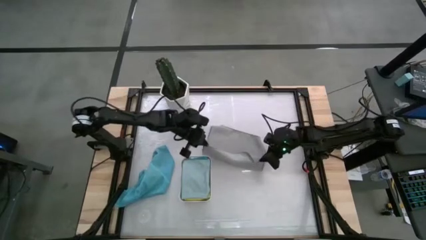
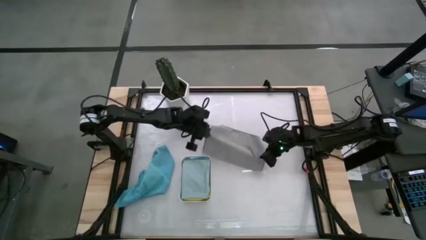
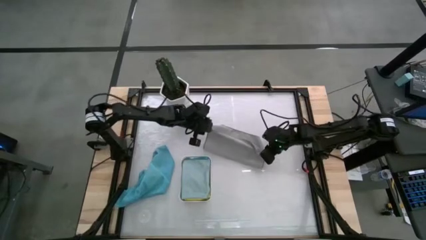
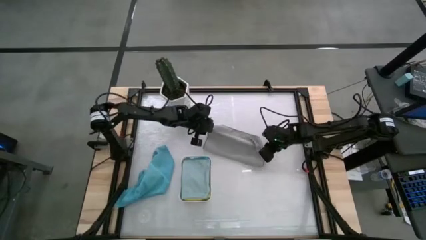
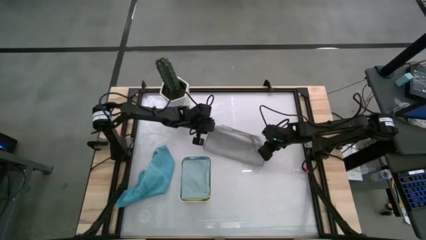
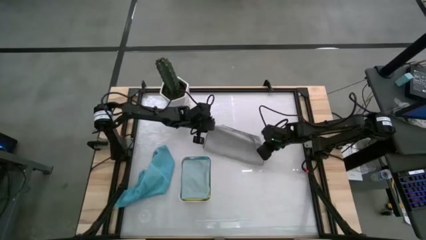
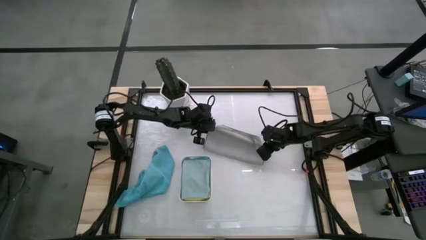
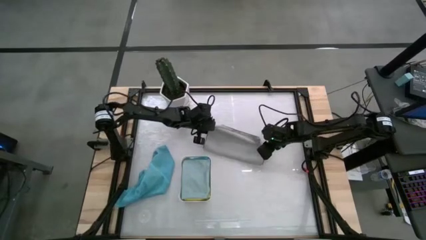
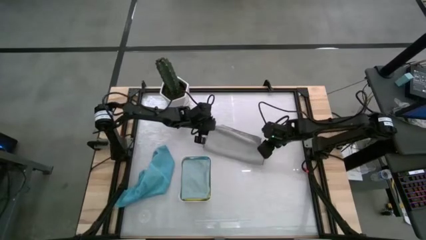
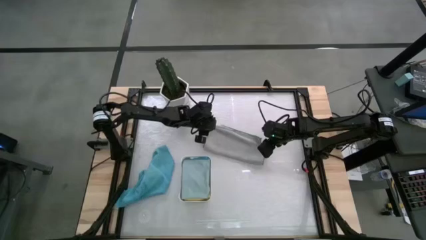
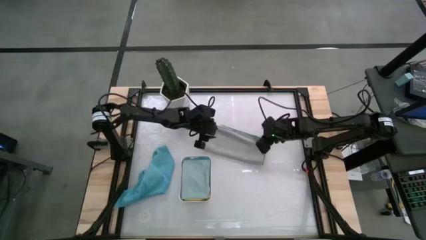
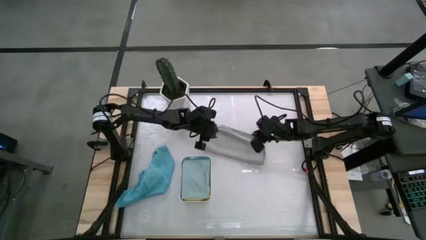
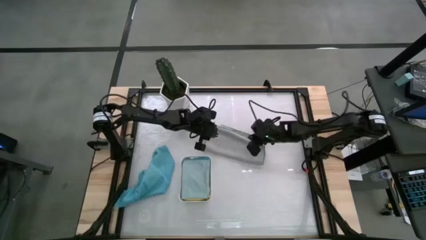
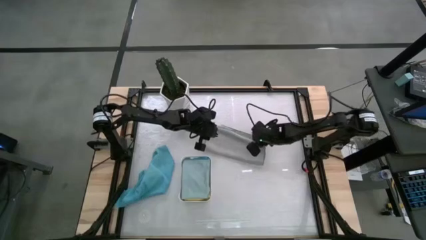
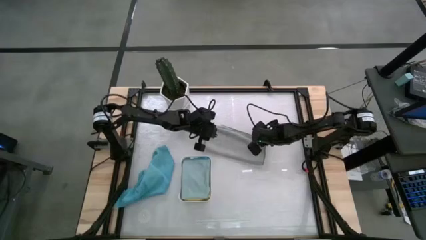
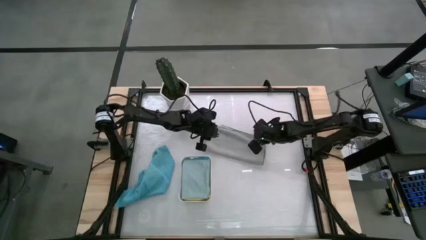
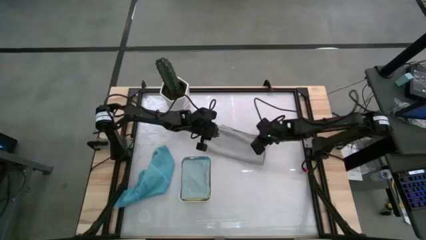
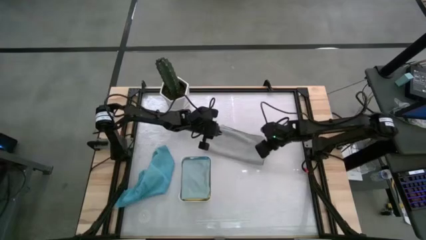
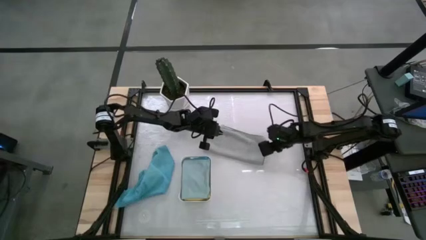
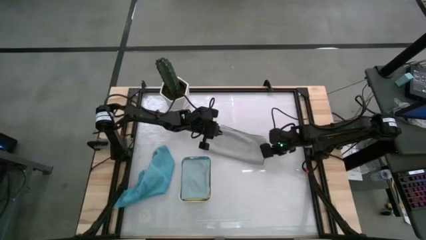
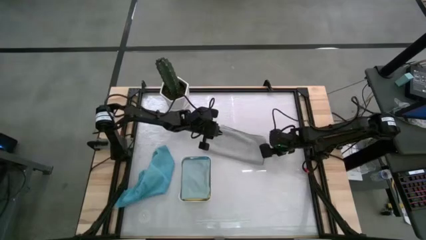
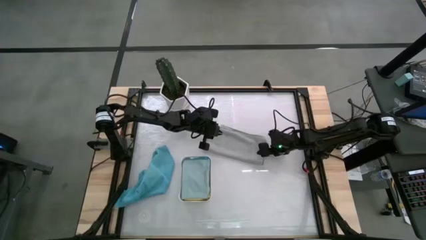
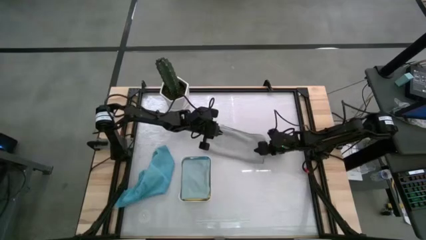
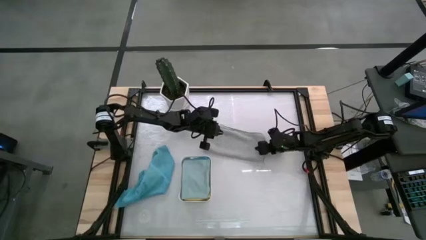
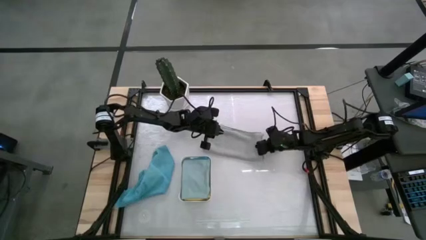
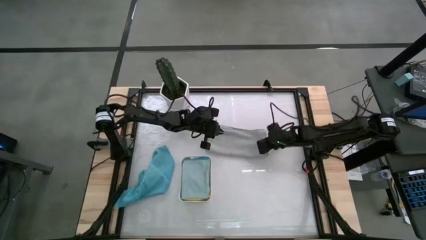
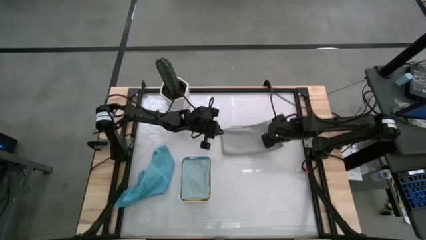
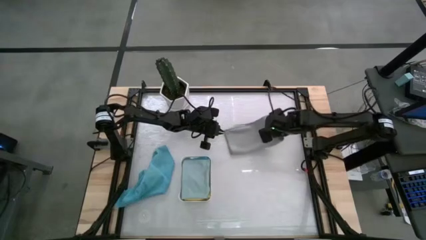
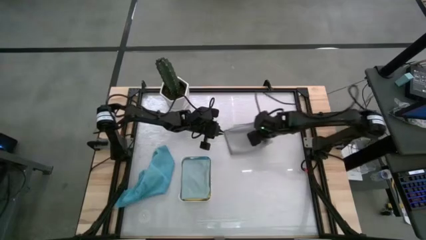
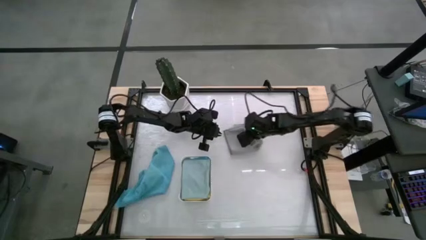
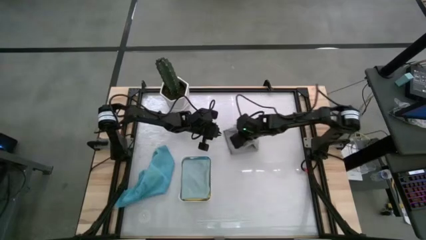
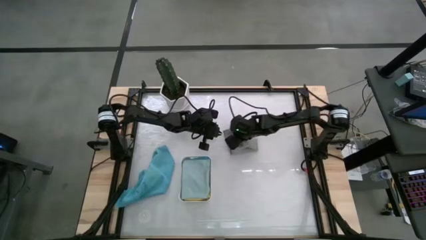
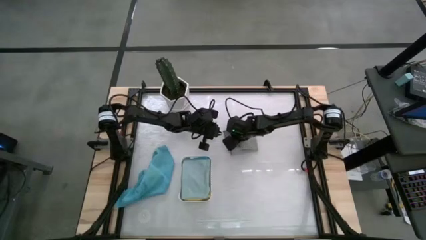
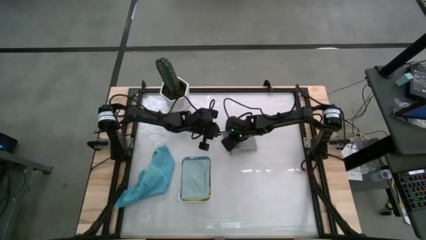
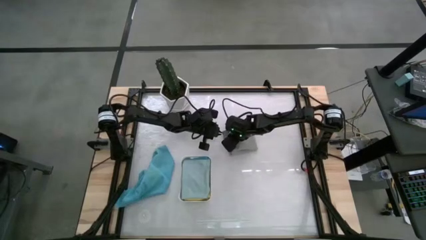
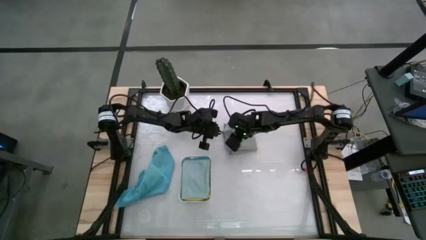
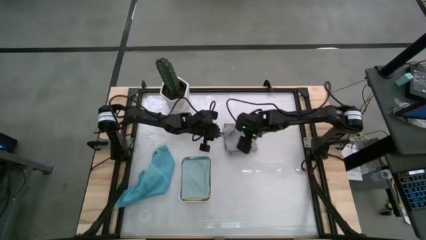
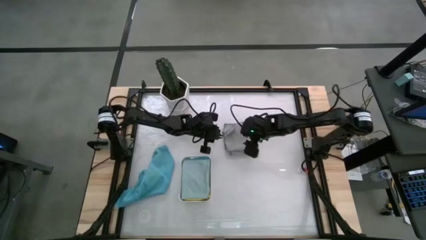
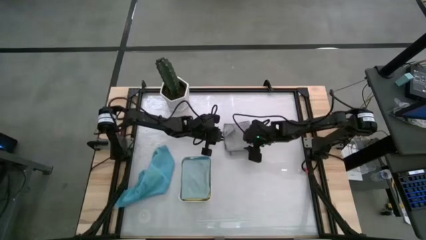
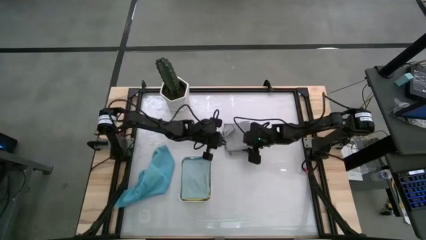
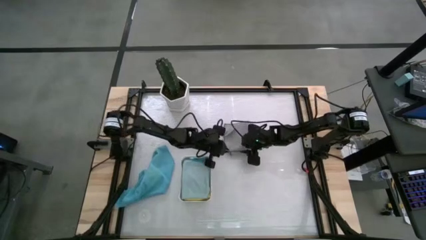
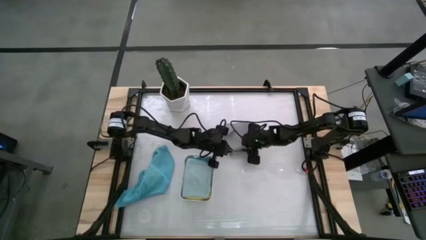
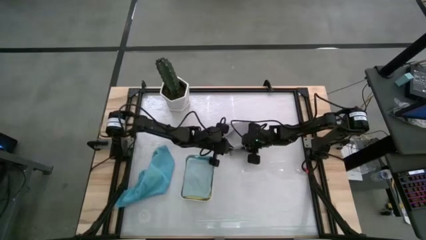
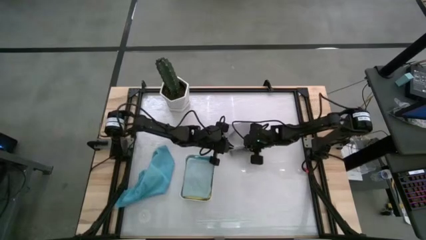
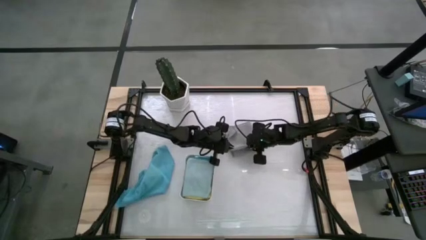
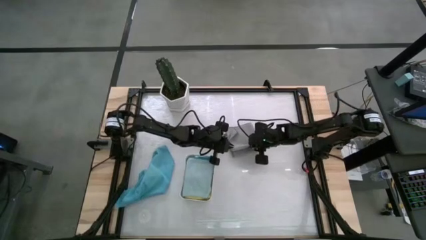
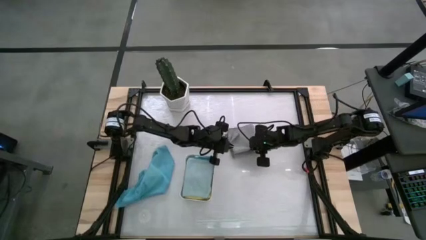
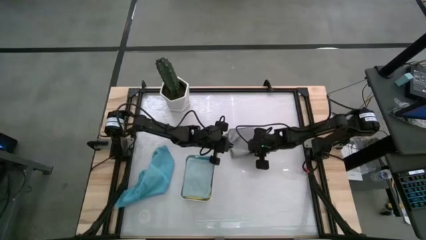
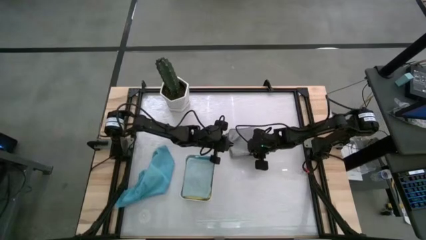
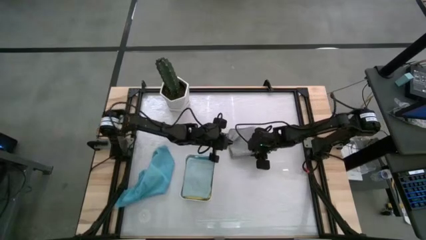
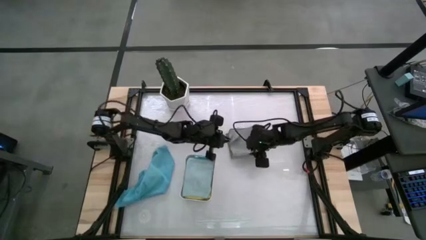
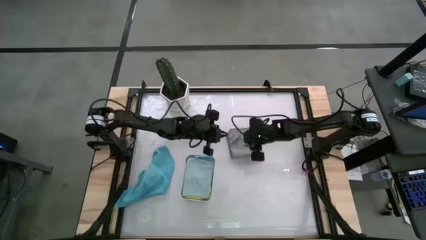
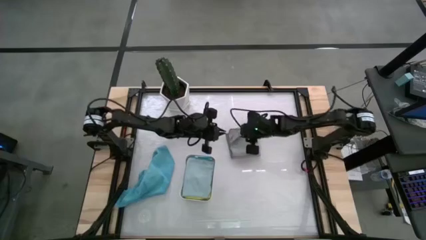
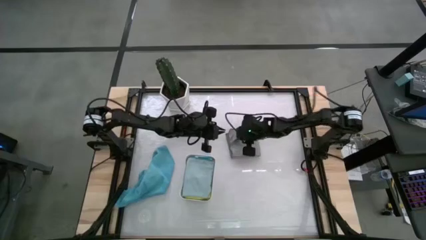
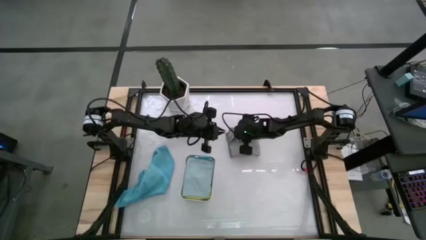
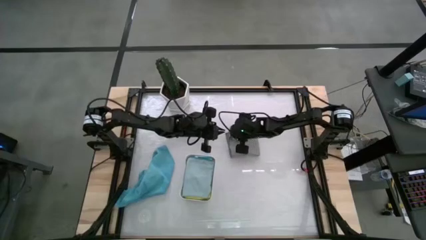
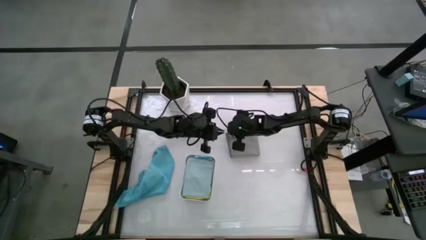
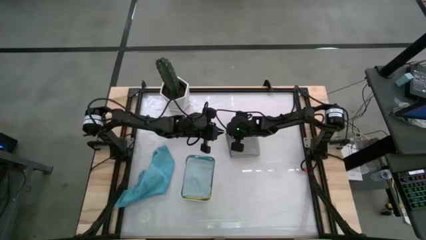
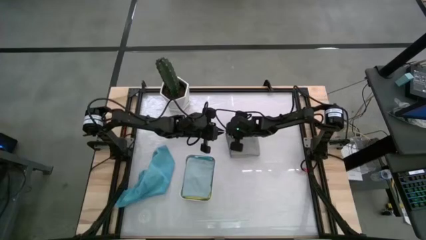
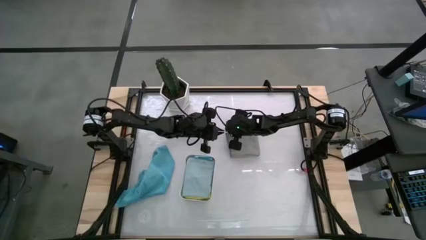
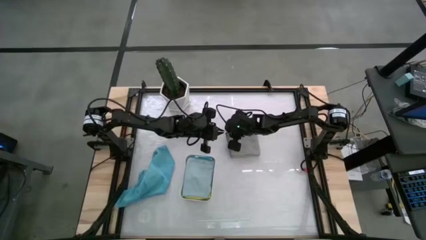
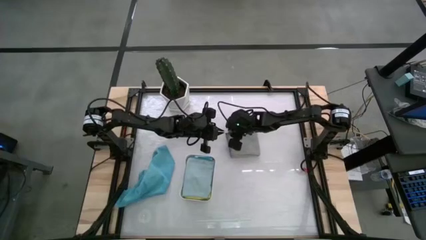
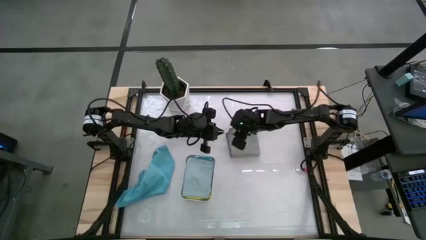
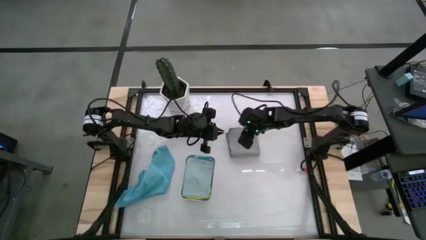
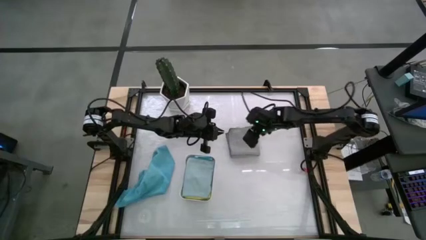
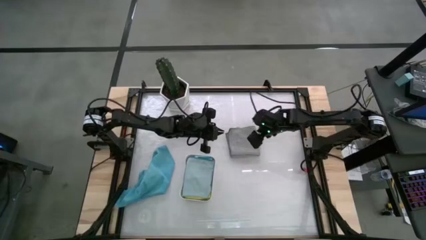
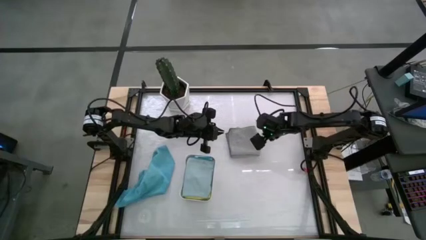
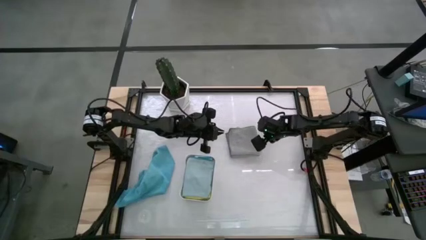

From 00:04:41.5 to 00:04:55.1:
Task: Fold microfiber towels
Fold the gray microfiber towel
